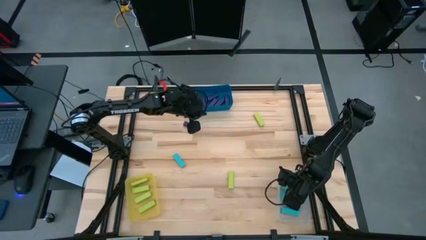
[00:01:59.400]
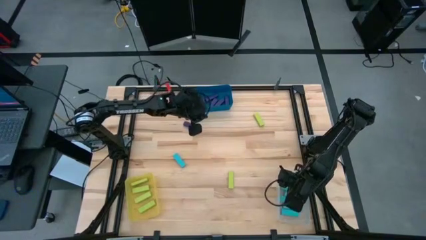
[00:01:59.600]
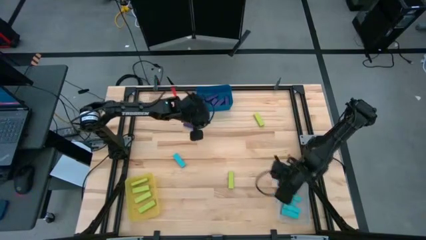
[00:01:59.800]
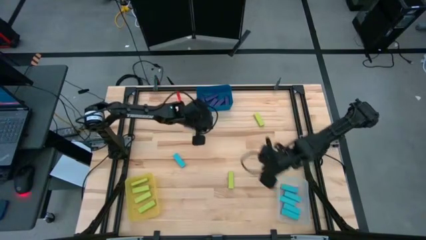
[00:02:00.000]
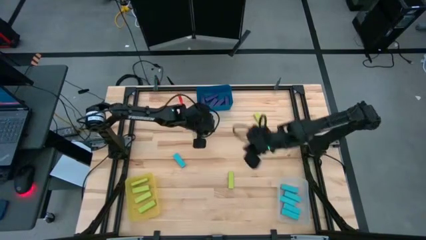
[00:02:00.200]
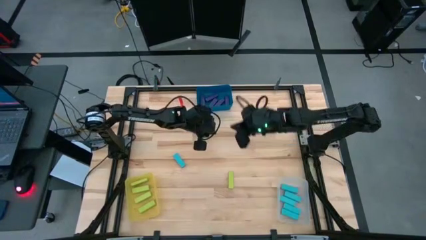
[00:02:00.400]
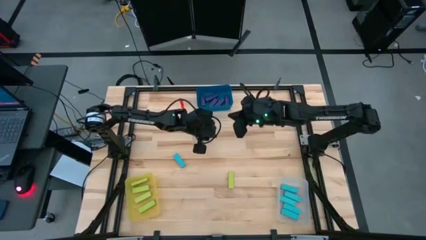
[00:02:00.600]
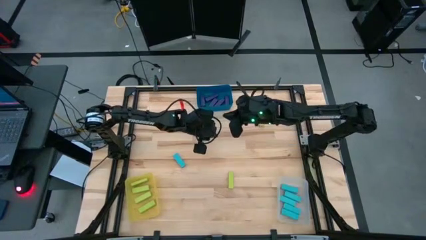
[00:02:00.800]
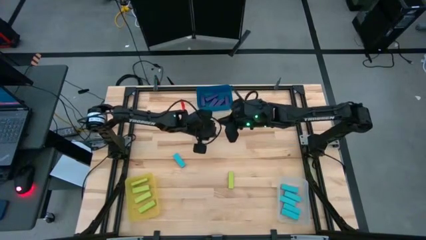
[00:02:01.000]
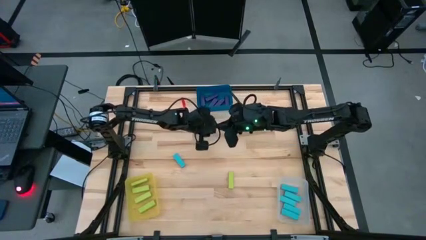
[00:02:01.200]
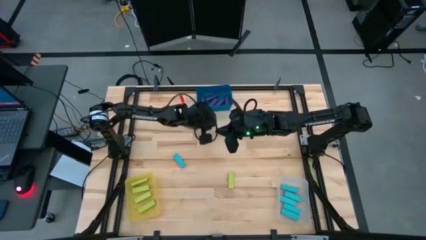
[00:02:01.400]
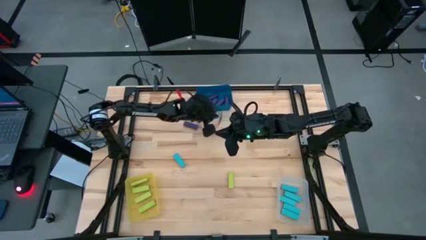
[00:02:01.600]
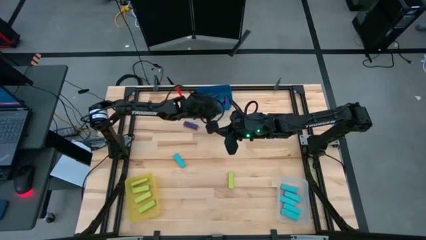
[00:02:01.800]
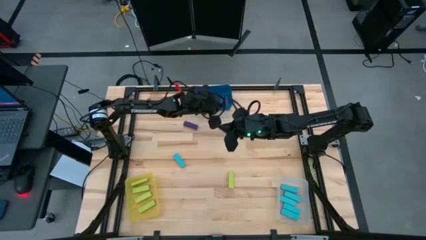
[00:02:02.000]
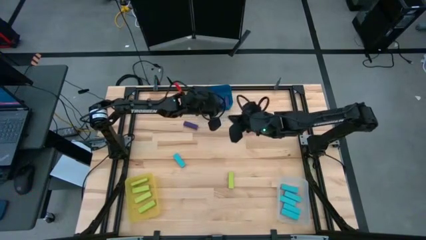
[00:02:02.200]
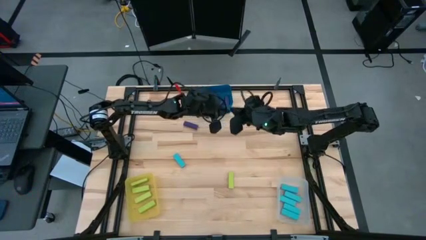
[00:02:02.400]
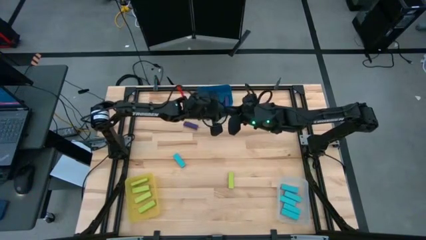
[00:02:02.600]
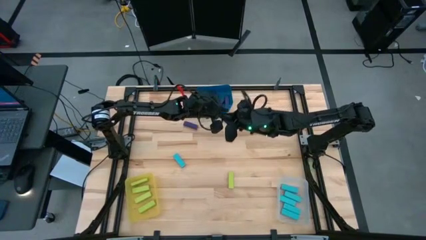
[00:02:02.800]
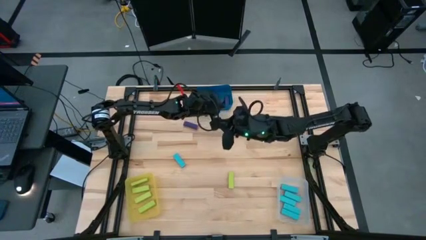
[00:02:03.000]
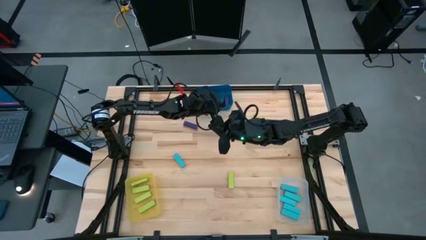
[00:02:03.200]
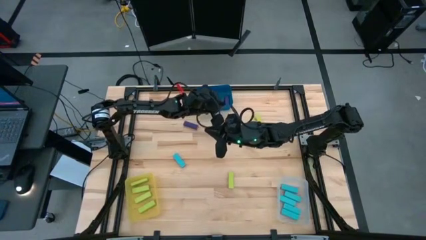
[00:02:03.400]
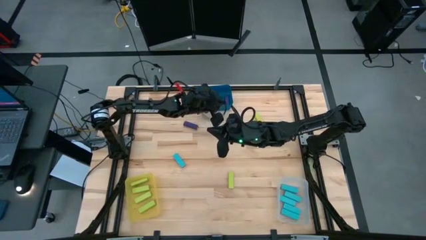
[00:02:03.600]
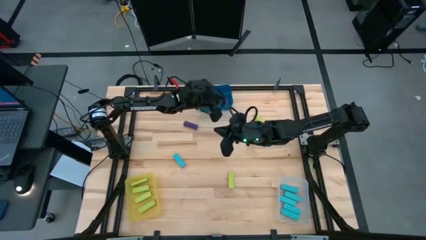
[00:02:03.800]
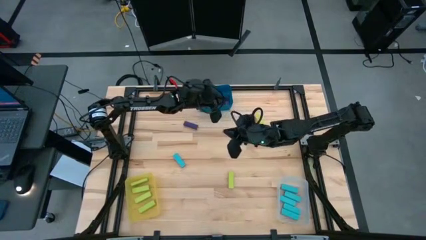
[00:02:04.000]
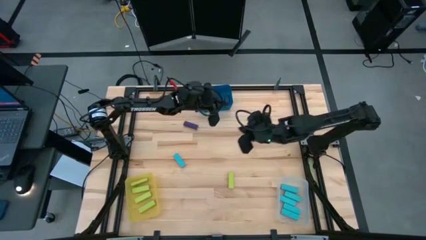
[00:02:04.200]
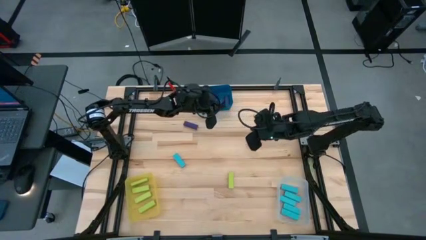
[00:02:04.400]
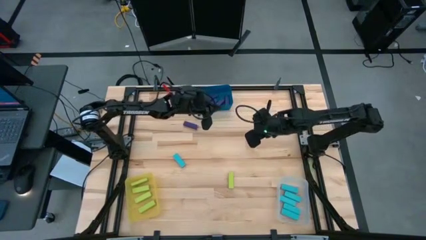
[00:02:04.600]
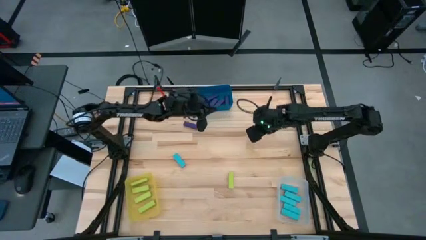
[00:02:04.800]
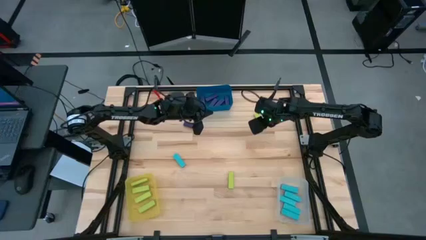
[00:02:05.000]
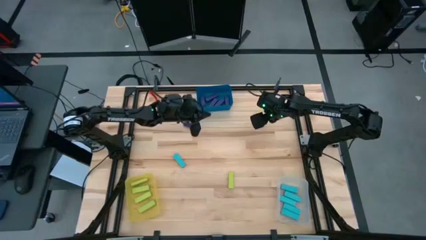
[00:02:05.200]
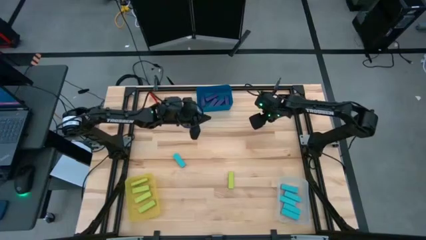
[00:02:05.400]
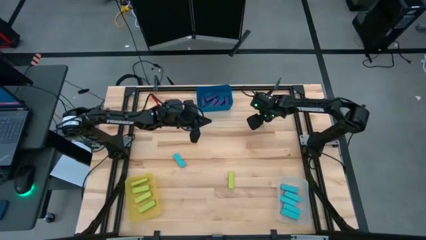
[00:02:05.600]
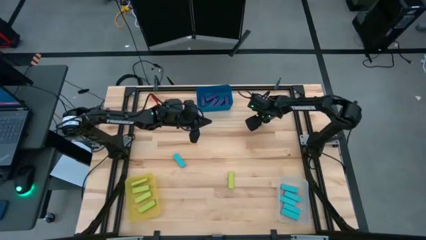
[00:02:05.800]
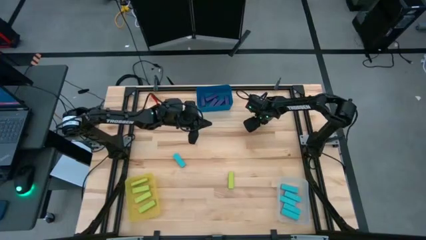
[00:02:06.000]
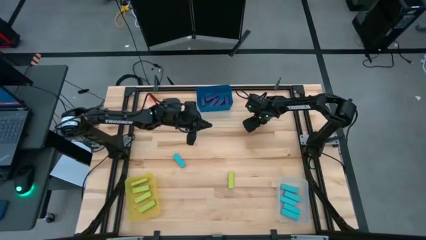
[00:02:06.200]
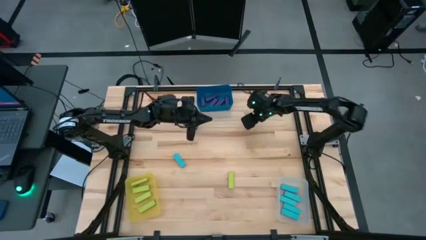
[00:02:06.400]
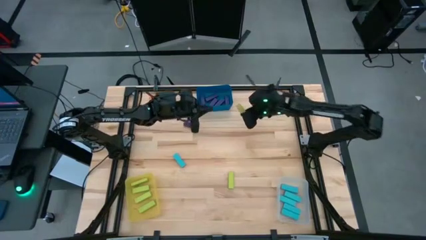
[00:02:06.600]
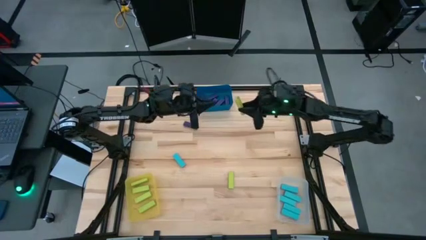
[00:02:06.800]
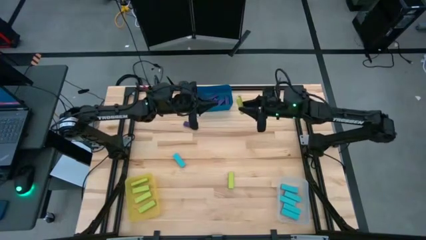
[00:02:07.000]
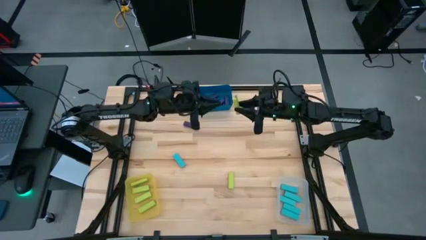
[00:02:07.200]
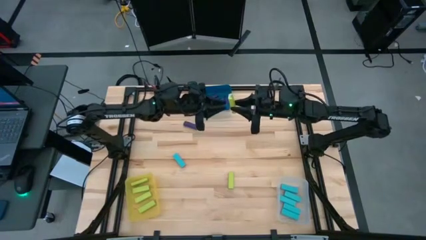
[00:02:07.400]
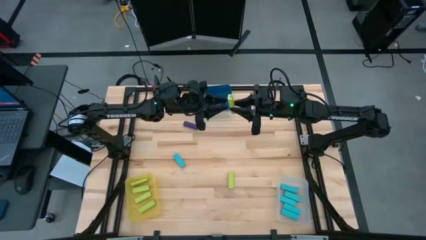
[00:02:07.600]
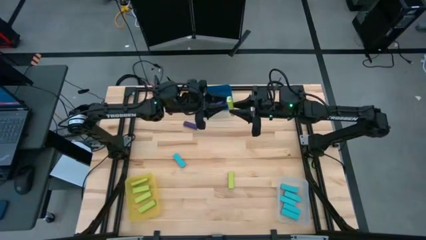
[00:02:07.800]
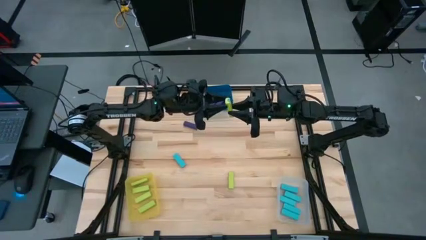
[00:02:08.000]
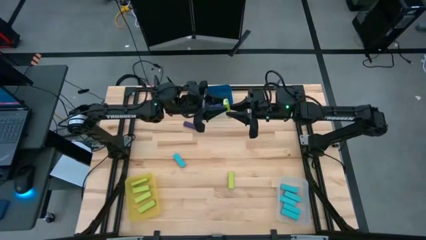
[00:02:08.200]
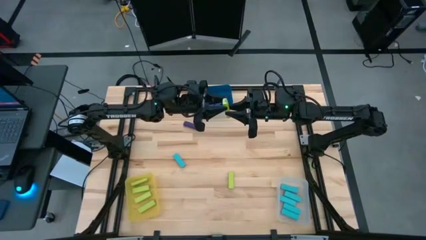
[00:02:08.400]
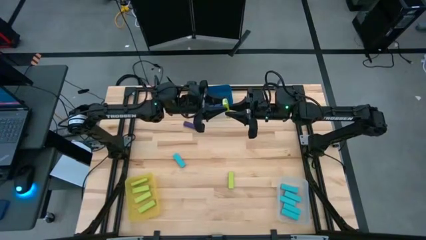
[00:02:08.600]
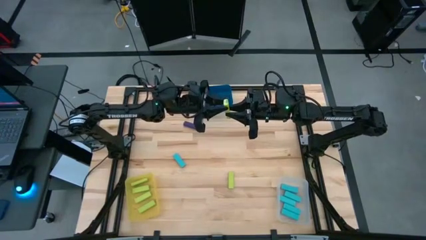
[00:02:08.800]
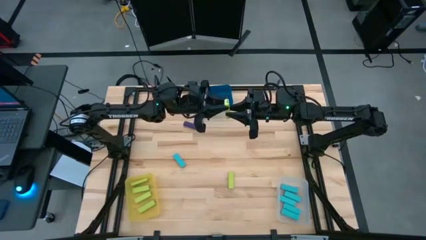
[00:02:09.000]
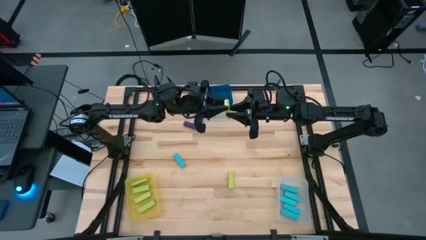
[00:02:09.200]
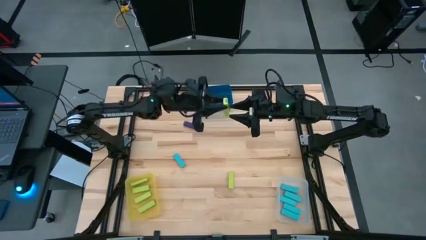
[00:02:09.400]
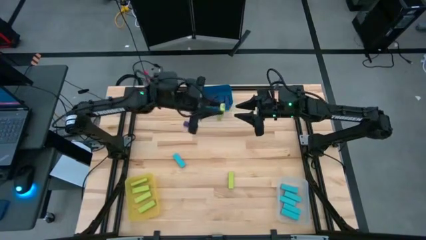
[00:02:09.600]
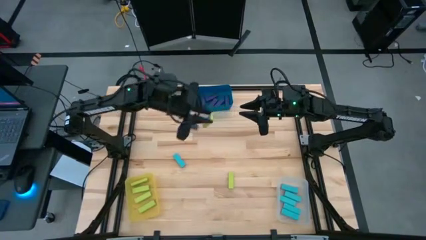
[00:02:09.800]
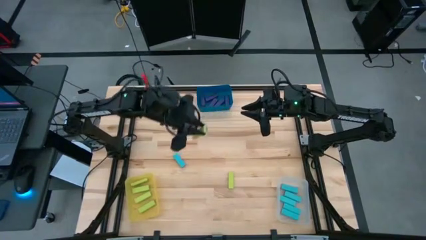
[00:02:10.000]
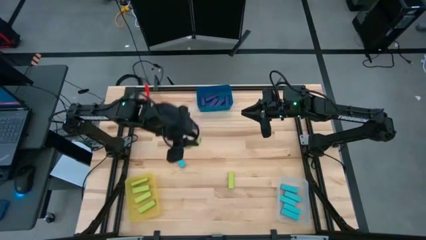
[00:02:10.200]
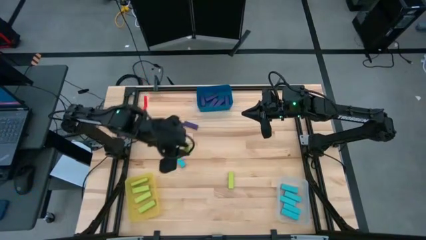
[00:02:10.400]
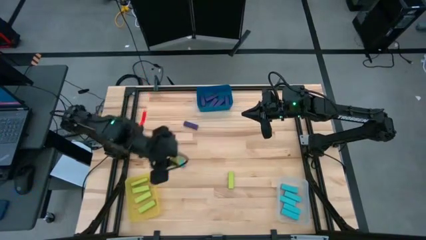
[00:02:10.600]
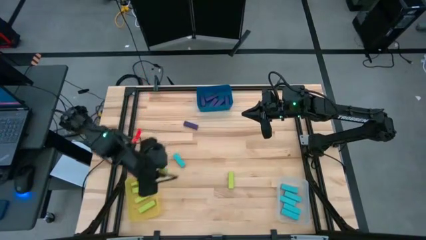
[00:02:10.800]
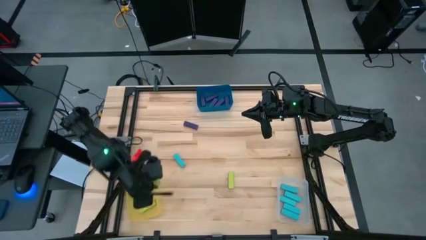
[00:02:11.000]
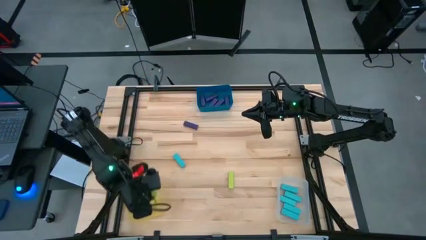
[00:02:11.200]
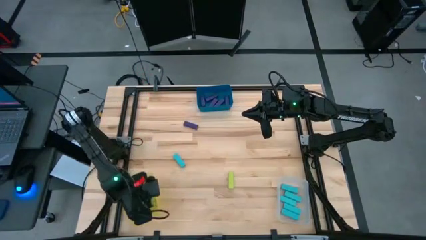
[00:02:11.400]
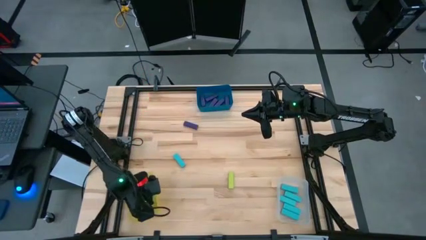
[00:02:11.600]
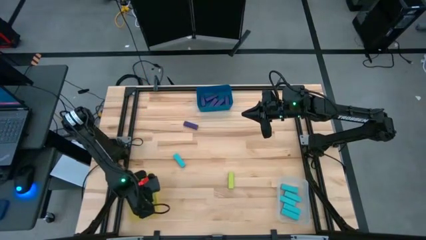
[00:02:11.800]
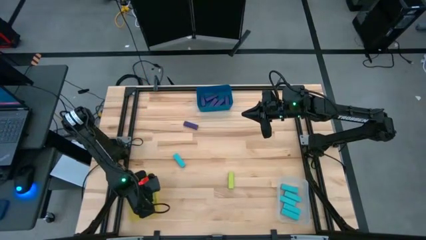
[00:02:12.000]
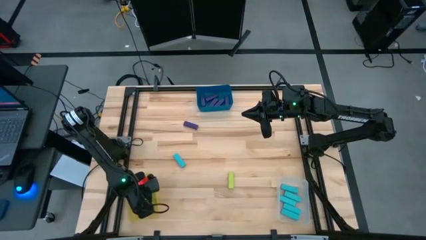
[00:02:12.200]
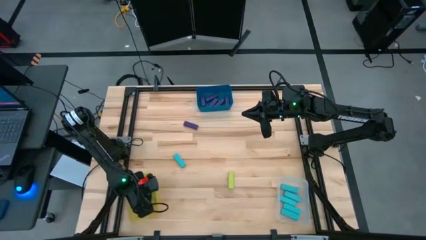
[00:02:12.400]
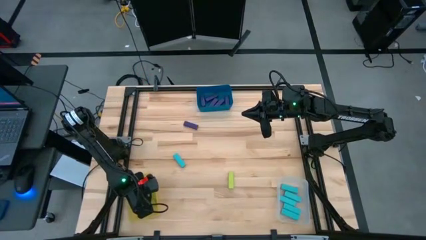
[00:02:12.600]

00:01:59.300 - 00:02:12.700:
Task: Sort blocks
Put the yellow green block into the yellow bin

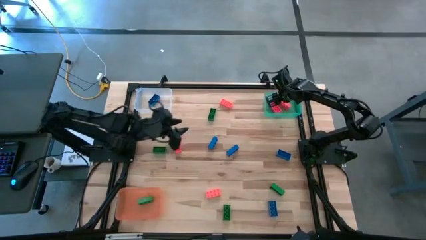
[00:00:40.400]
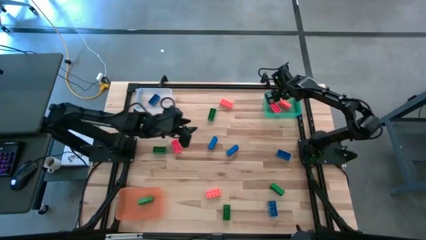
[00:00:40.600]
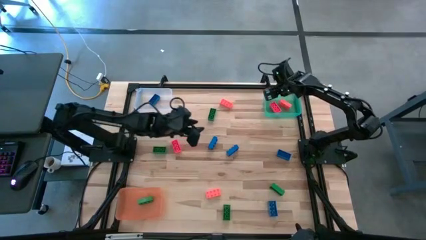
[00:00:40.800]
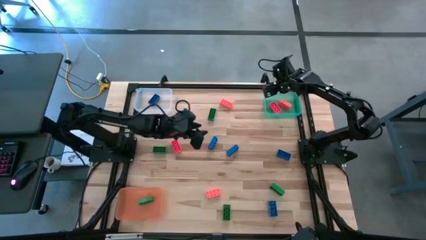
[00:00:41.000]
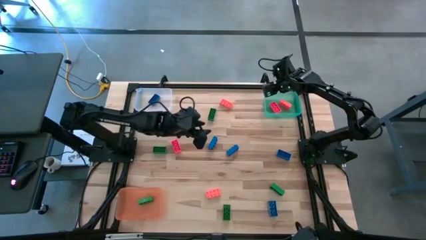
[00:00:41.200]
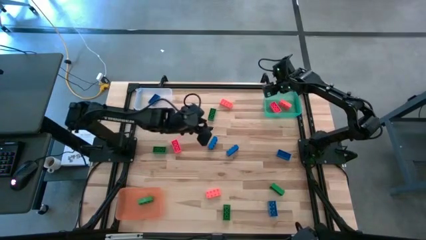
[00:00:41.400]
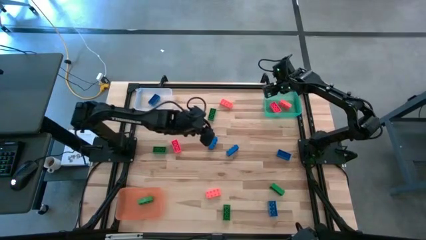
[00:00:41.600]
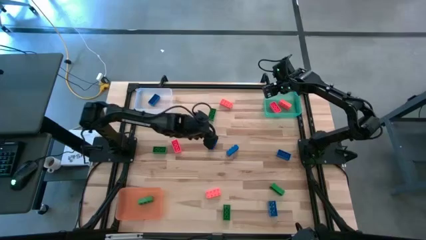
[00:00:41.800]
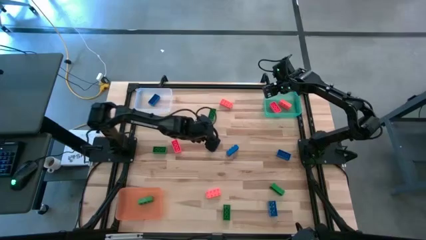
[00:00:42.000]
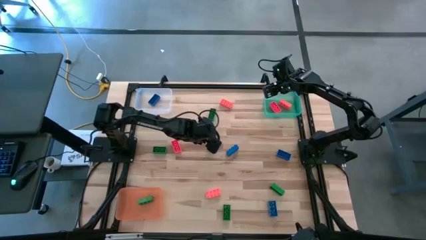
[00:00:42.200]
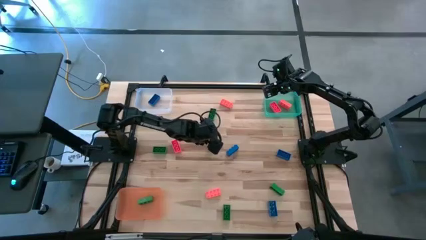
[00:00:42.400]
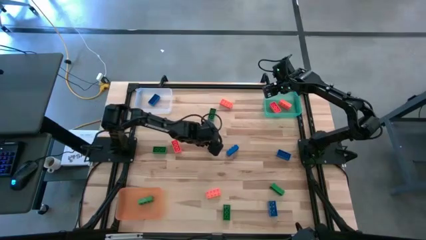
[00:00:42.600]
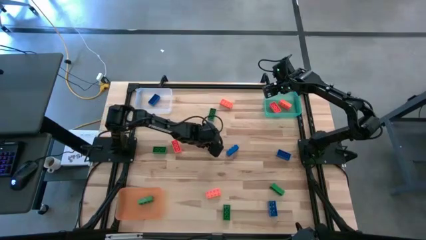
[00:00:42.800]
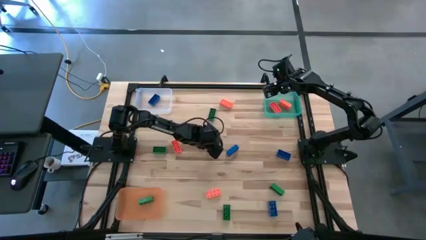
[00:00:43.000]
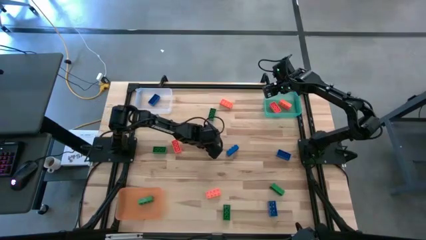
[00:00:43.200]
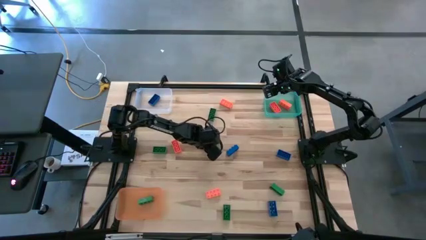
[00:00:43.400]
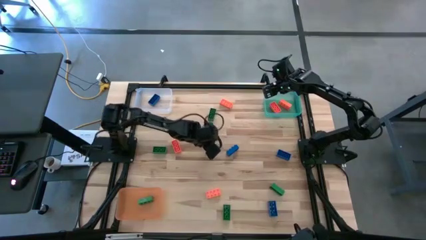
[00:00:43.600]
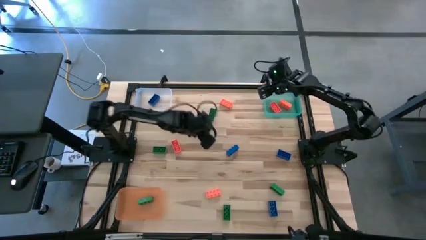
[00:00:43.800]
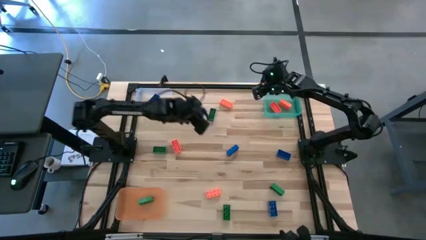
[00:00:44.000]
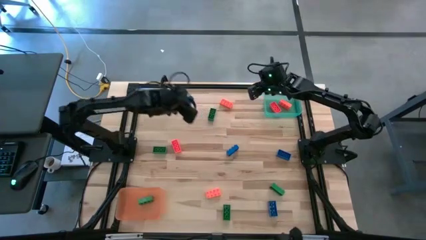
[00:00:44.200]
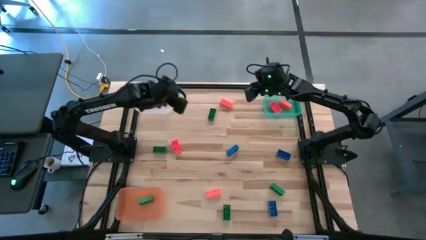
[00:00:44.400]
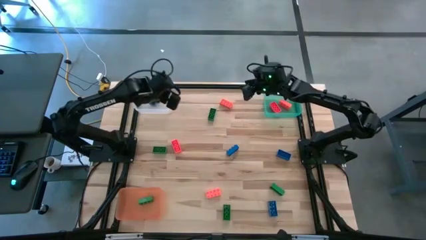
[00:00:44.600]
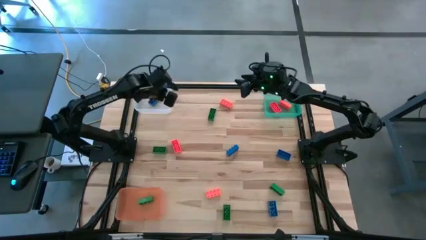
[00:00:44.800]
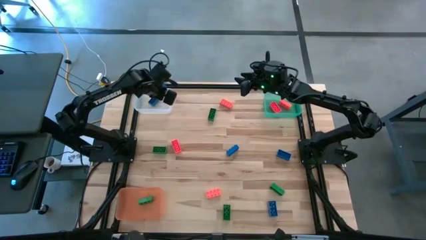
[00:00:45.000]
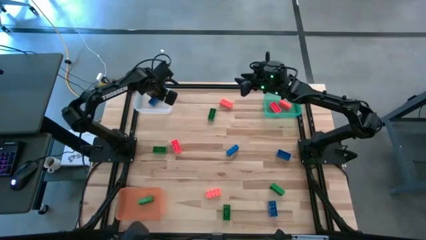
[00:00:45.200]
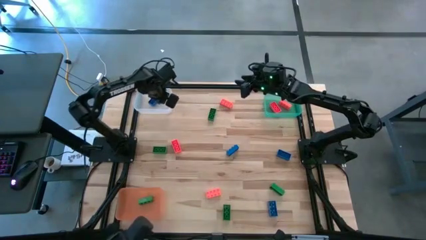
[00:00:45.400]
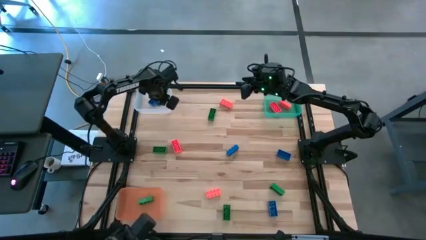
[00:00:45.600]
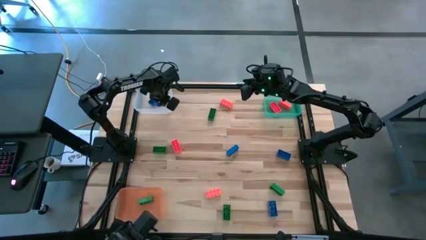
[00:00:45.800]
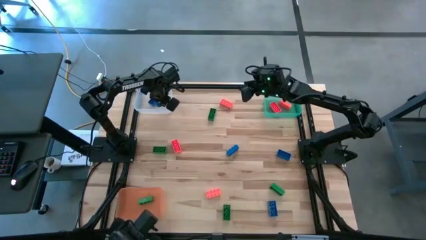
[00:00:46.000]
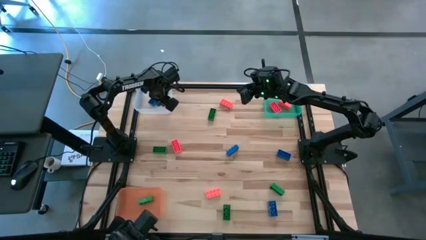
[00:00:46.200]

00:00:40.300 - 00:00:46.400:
Task: Sort & place blocks by color
Put the blue game piece into the transparent bin
